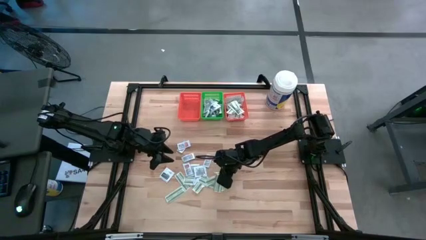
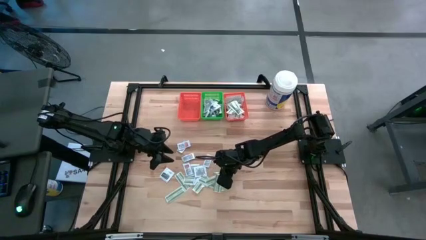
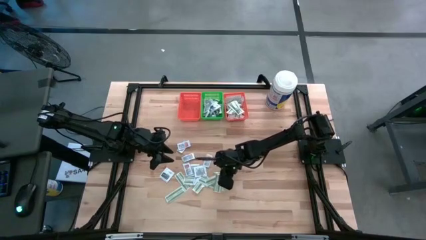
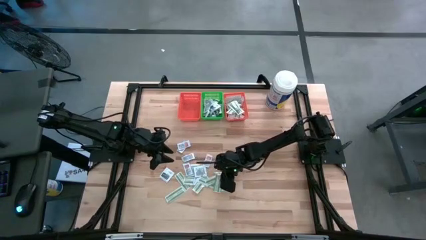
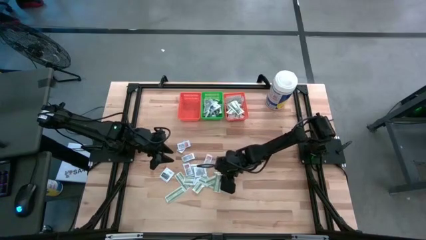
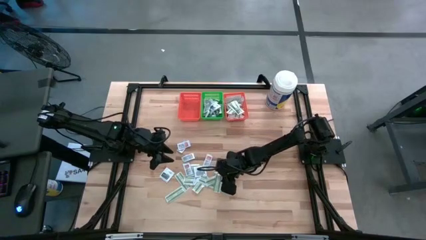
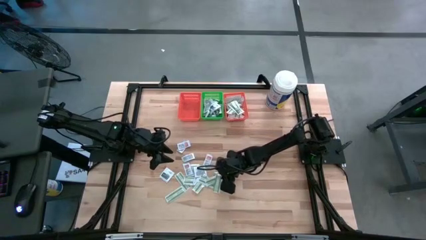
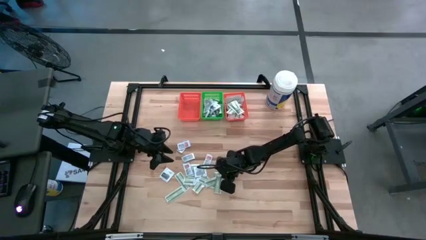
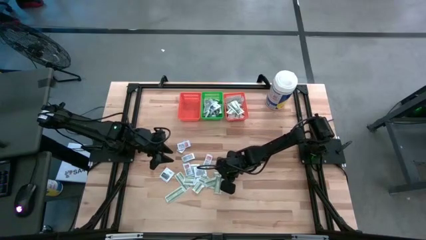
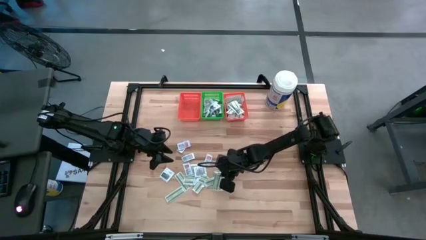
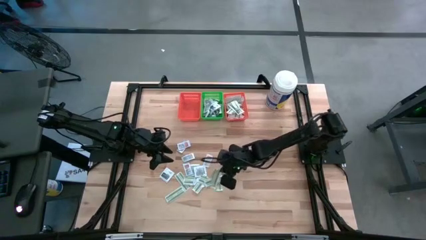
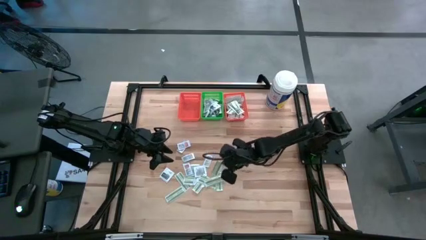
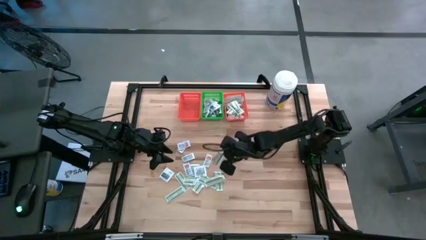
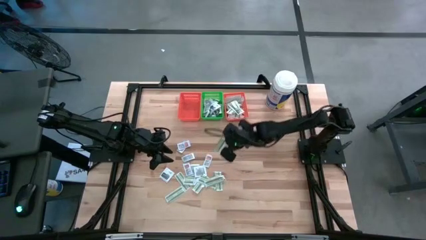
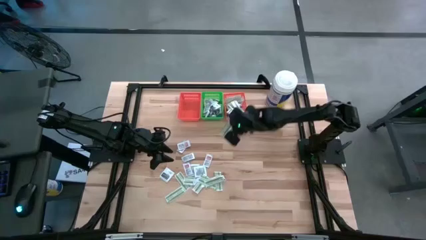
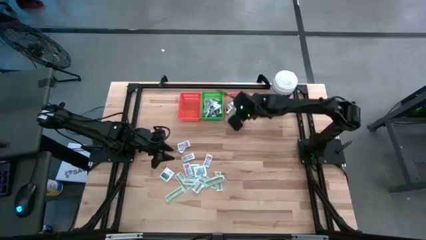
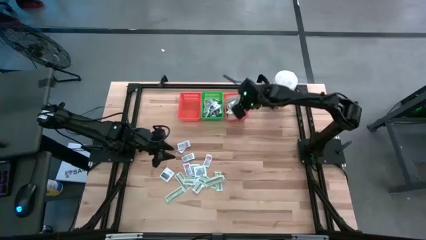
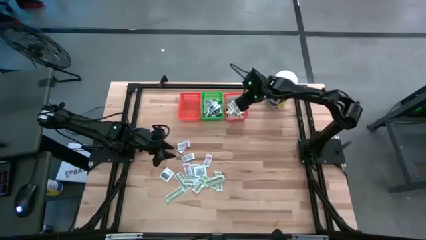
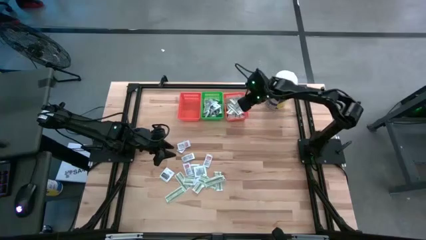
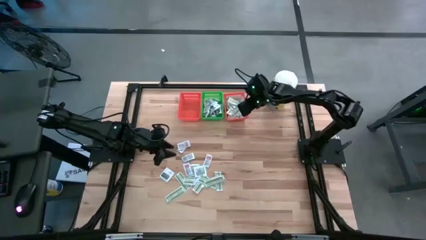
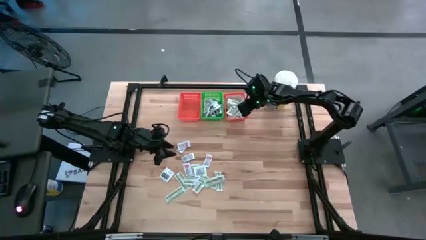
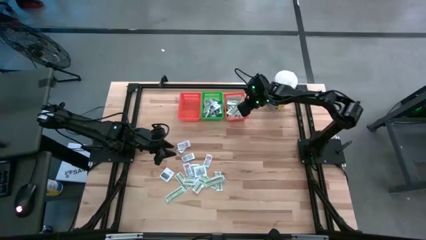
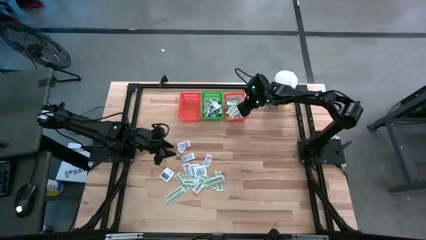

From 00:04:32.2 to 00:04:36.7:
Task: Pick & Place First Aid Supplies
Put the bandage pack into the right orange bin

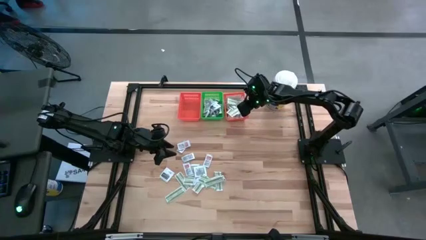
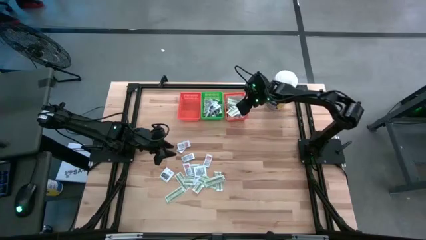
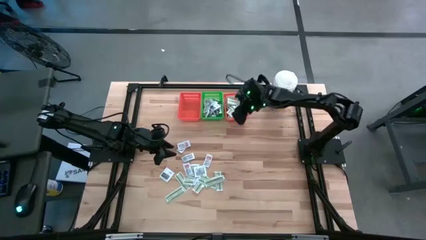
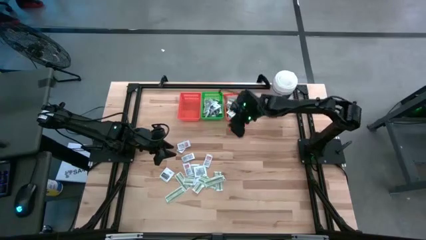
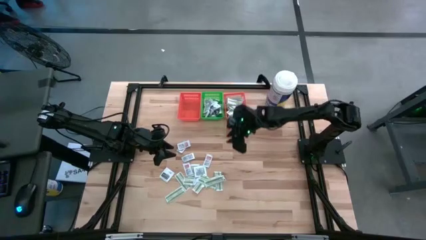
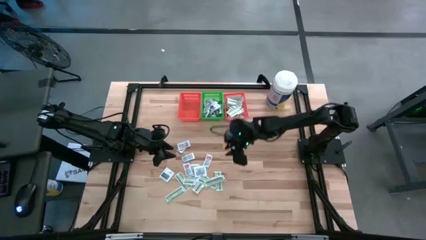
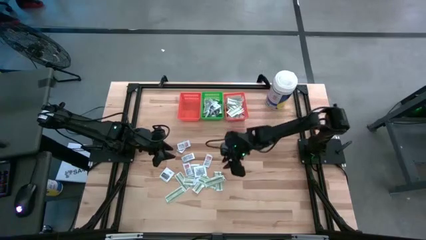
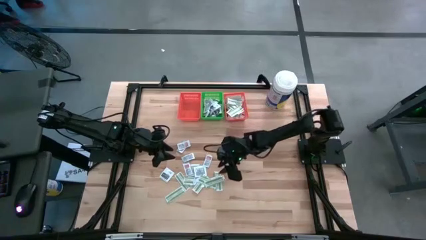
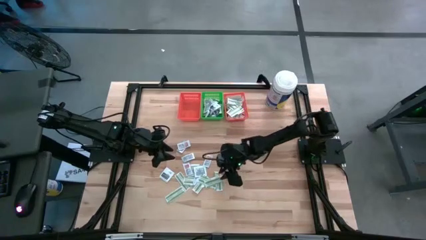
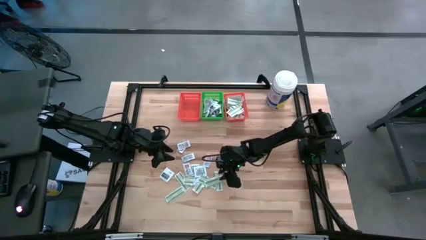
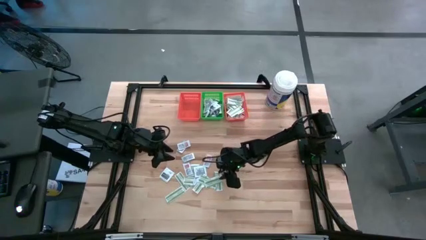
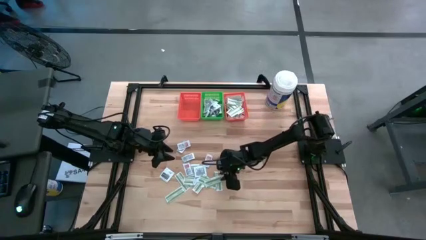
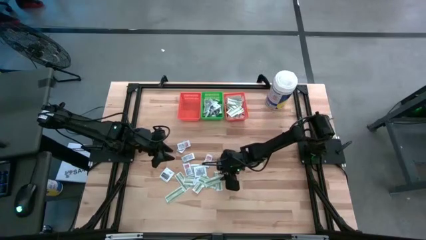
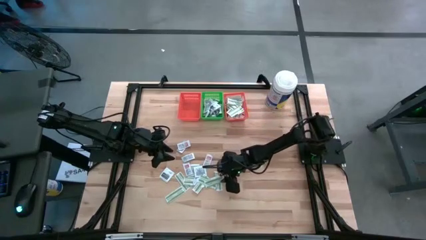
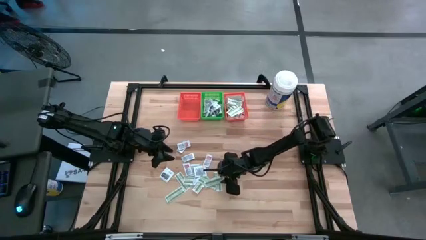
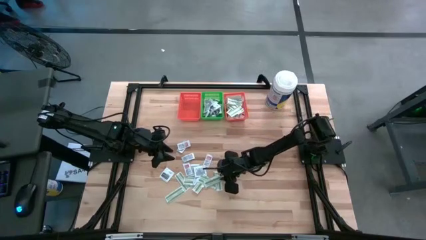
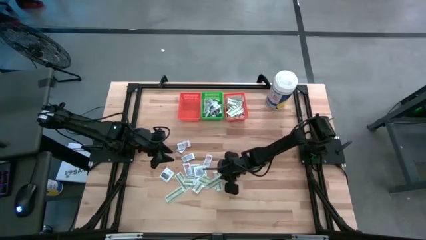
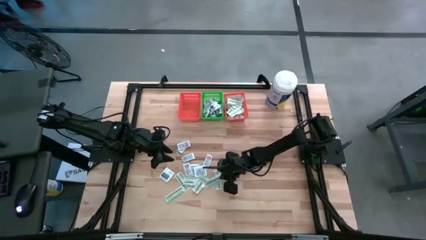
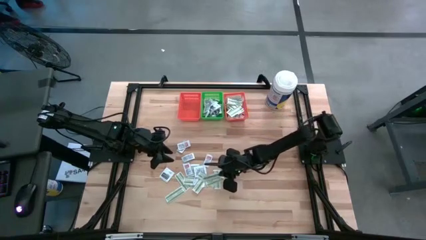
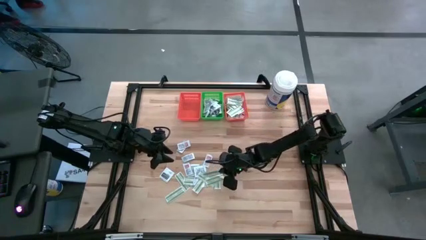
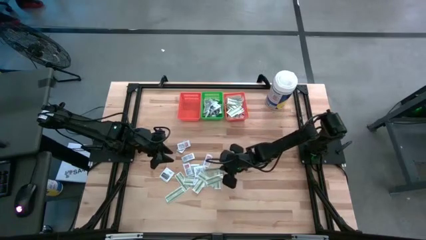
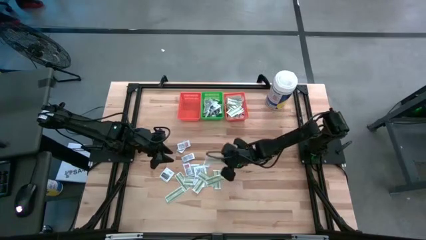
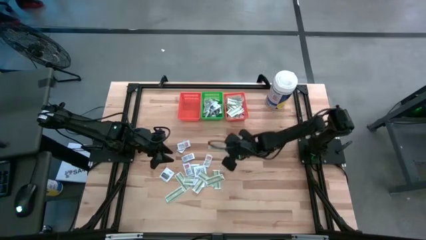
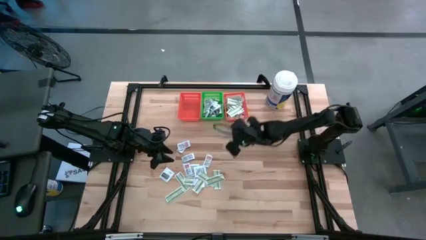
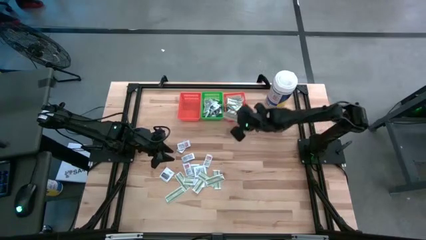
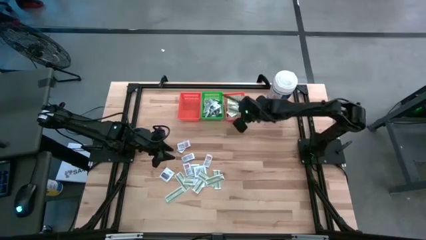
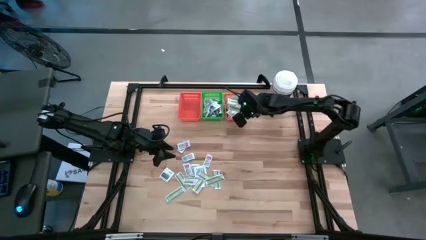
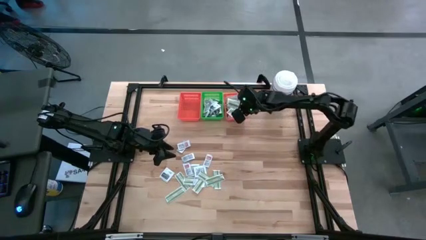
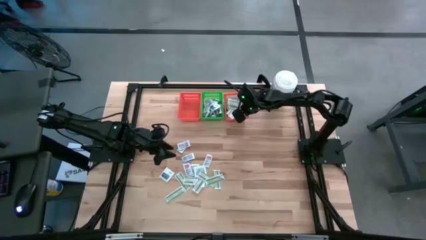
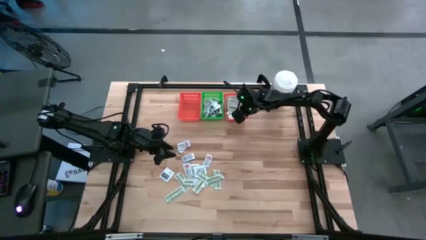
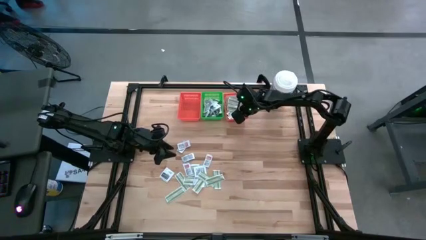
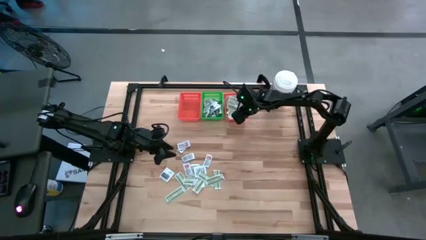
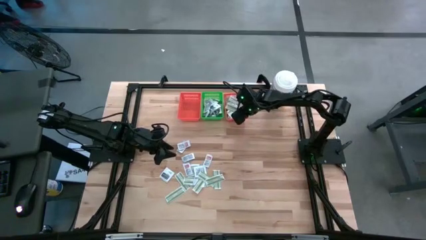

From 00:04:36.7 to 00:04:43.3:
Put the bandage pack into the right orange bin

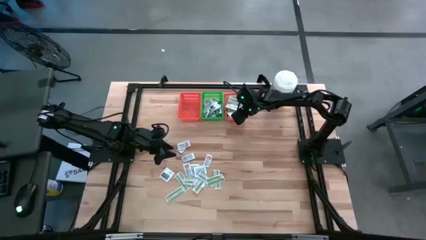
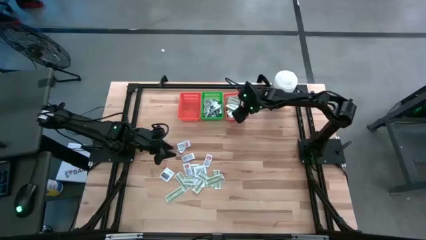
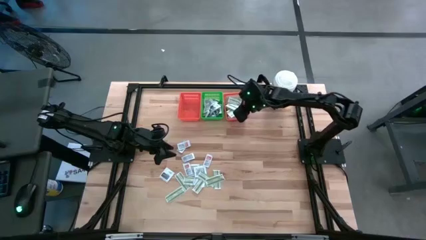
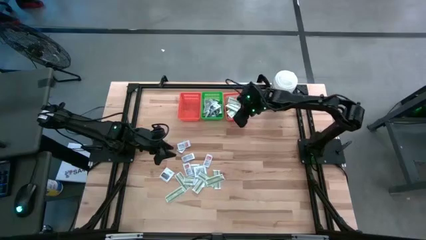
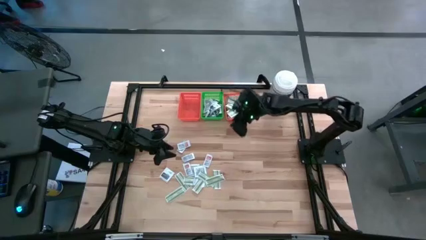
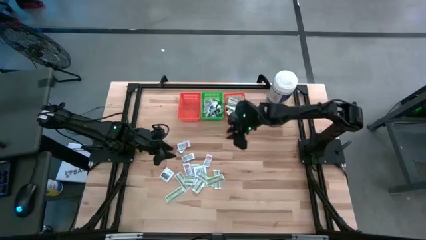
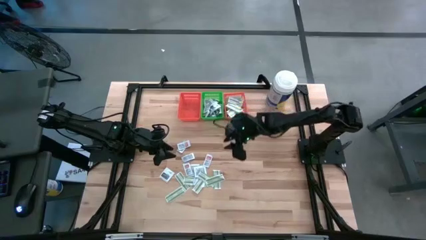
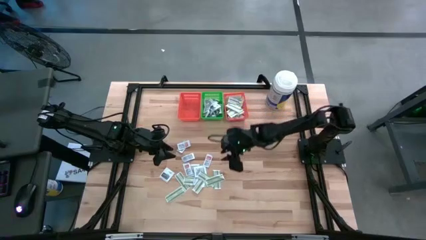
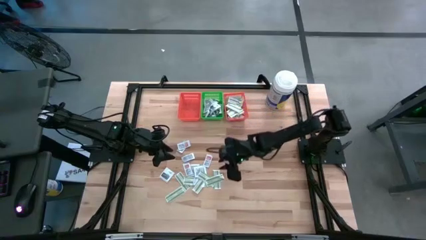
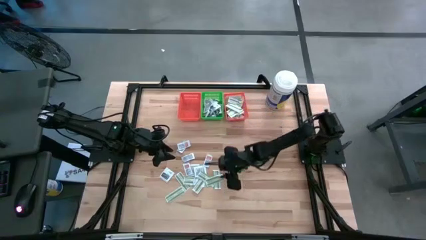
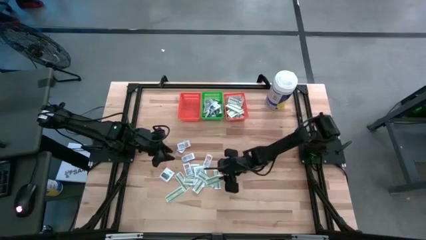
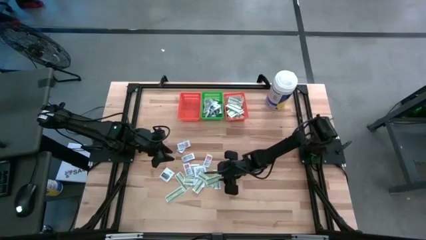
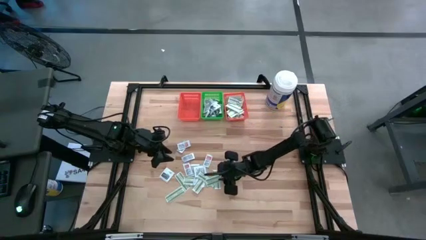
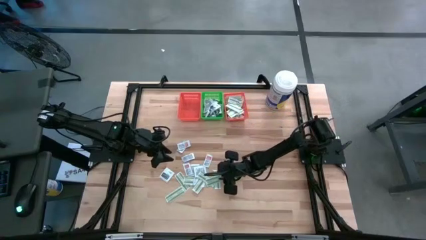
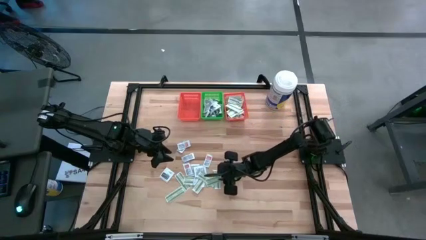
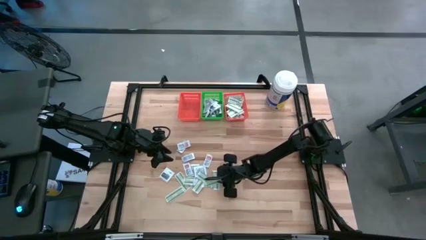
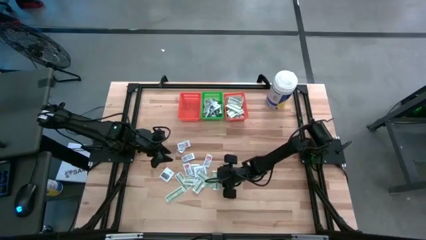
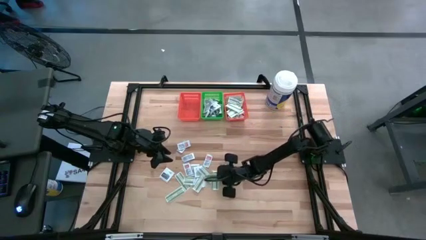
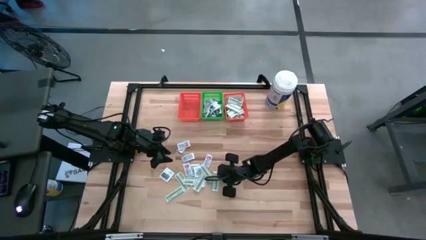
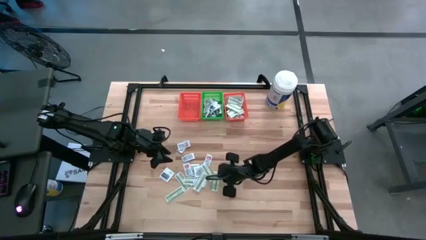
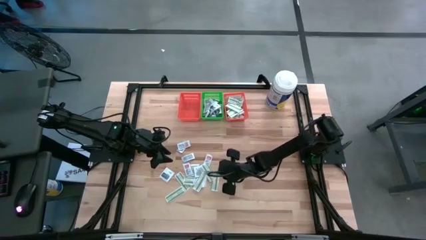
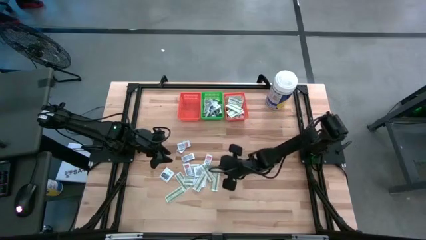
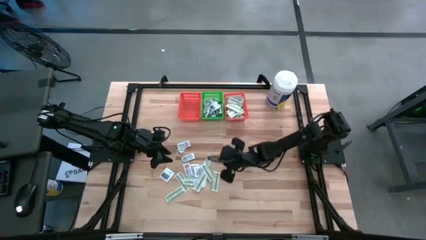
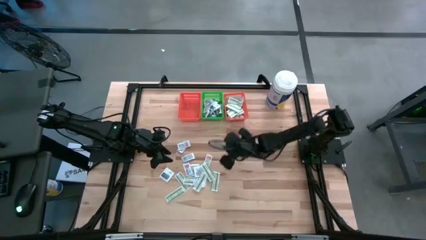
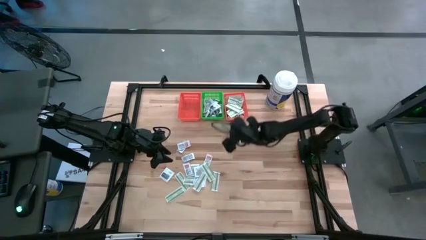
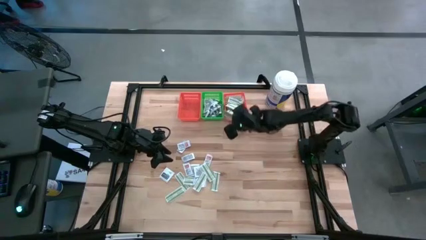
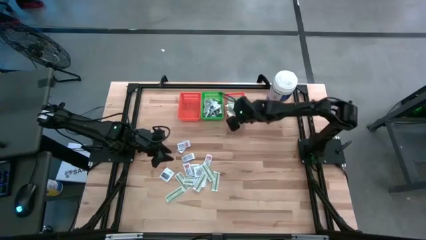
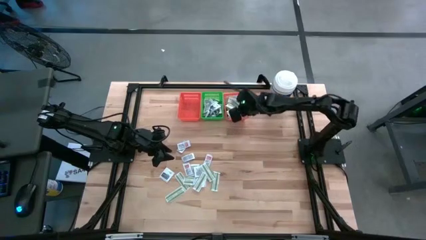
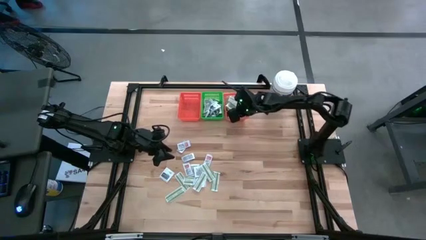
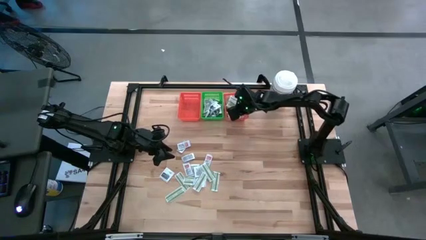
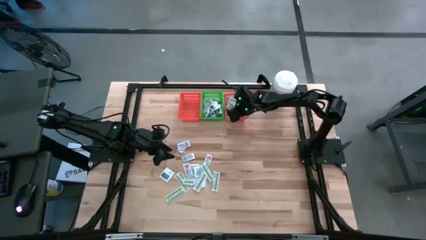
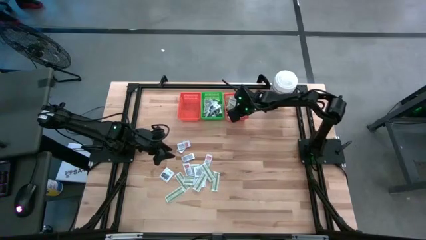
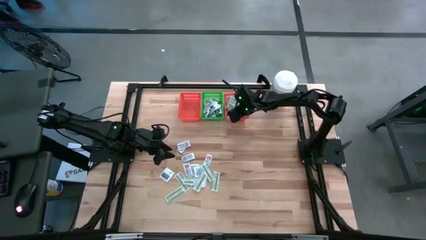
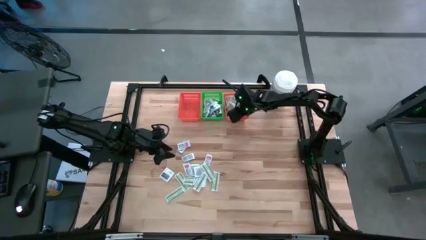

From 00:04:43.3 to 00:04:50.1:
Put the bandage pack into the right orange bin
